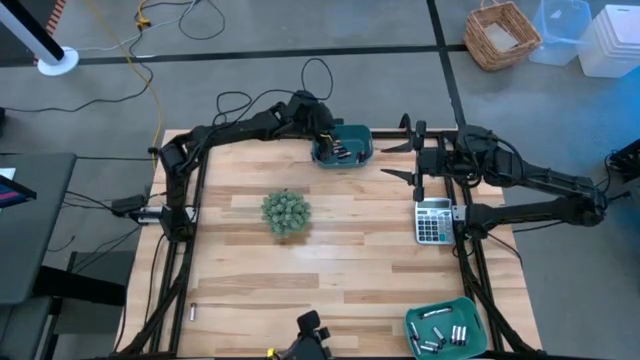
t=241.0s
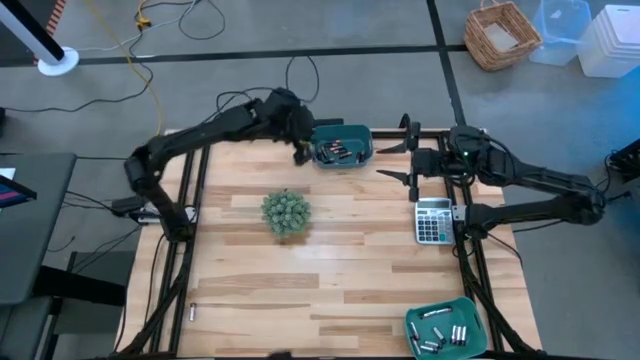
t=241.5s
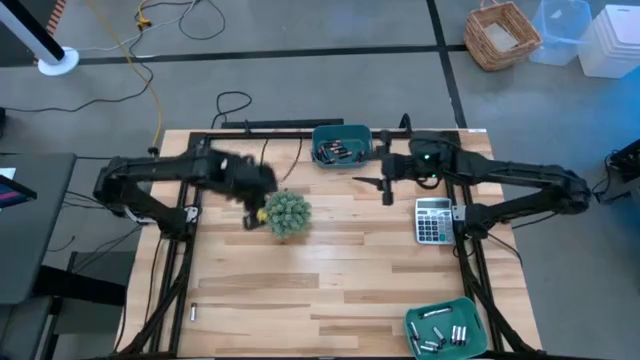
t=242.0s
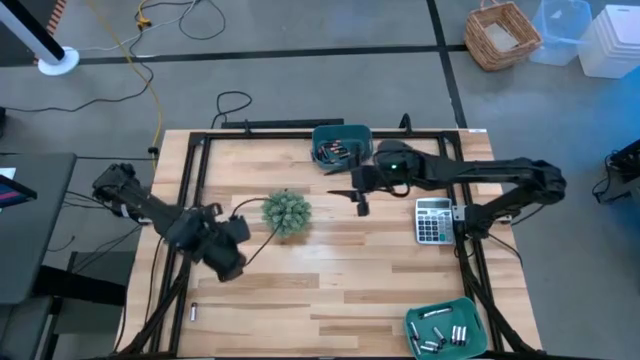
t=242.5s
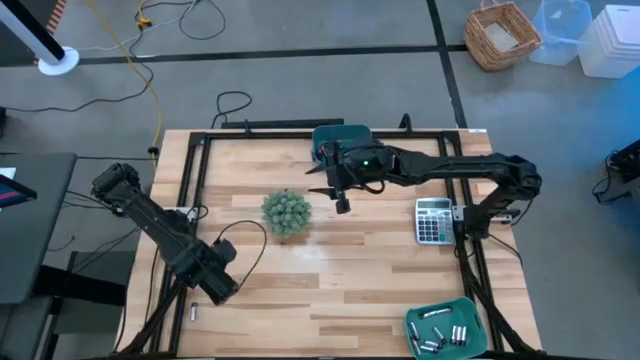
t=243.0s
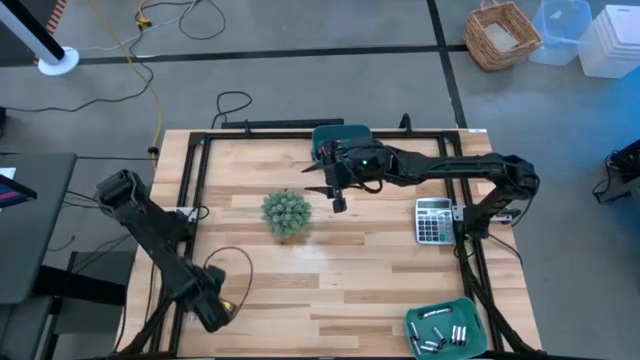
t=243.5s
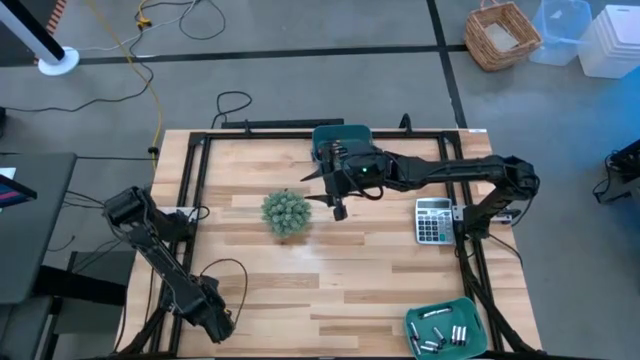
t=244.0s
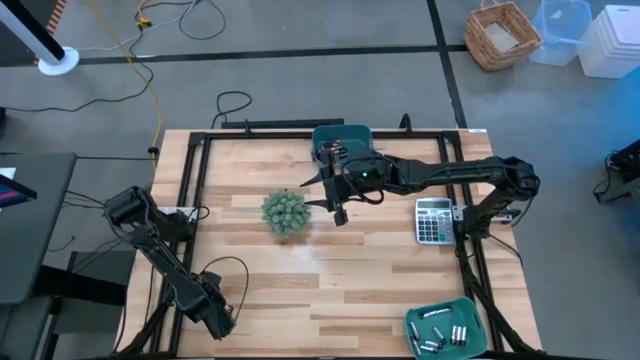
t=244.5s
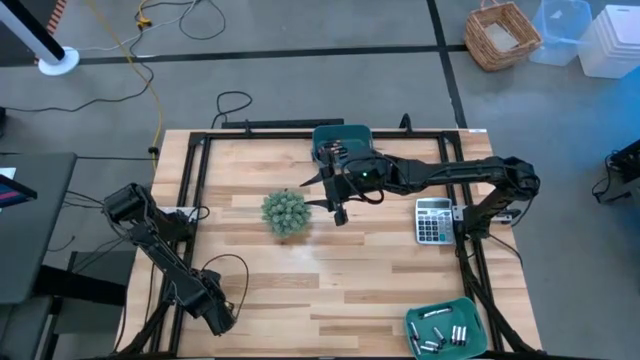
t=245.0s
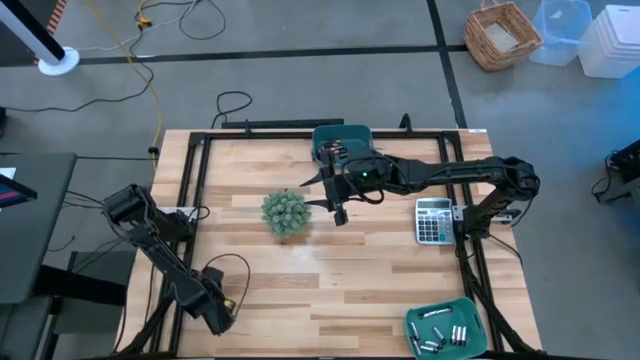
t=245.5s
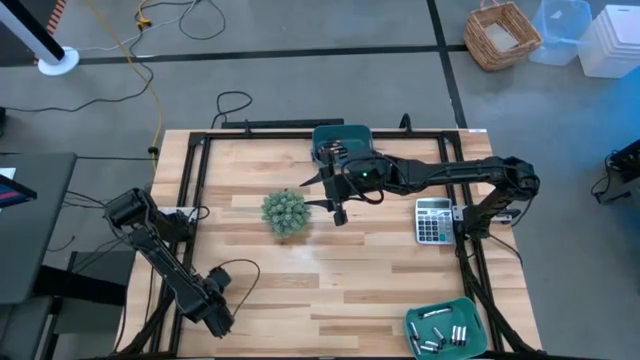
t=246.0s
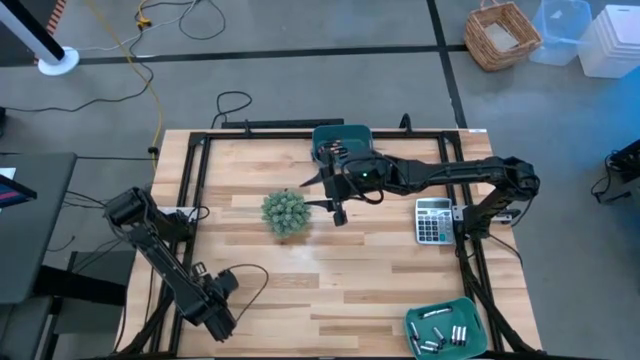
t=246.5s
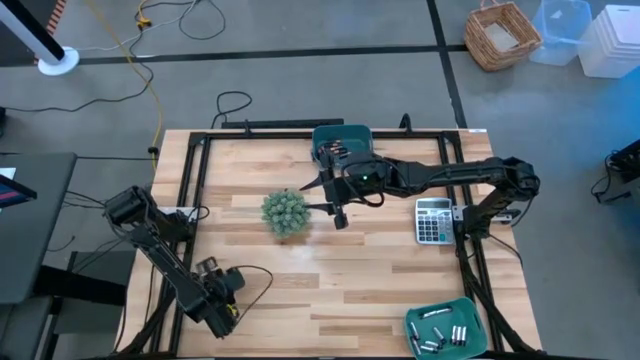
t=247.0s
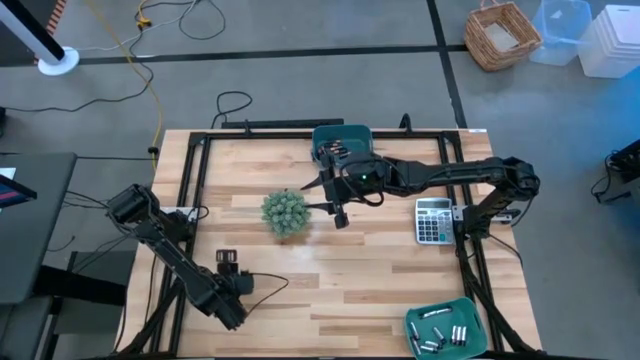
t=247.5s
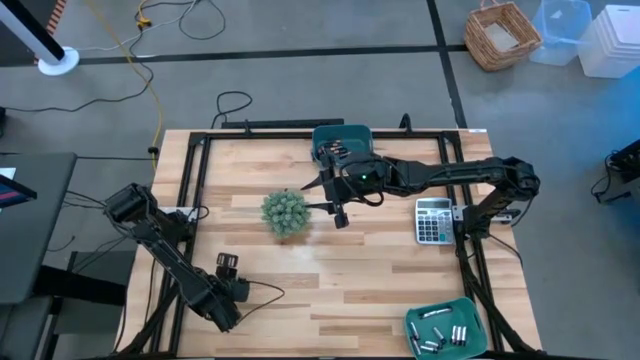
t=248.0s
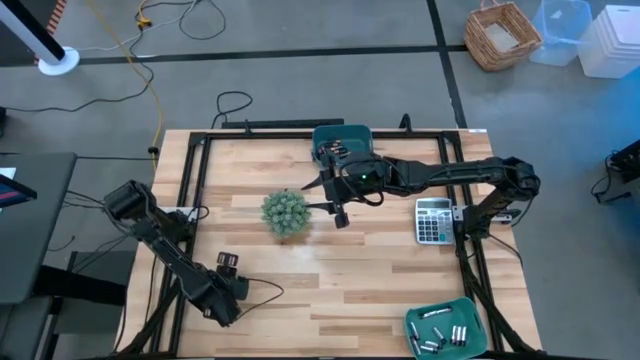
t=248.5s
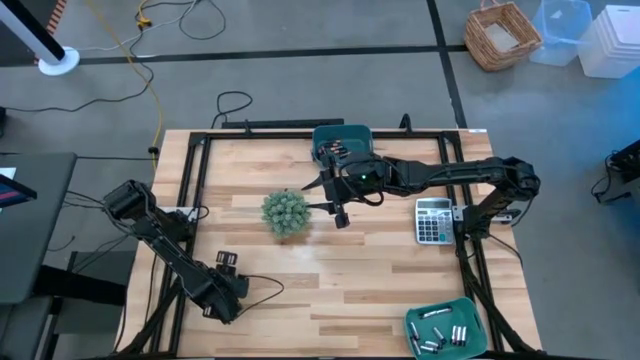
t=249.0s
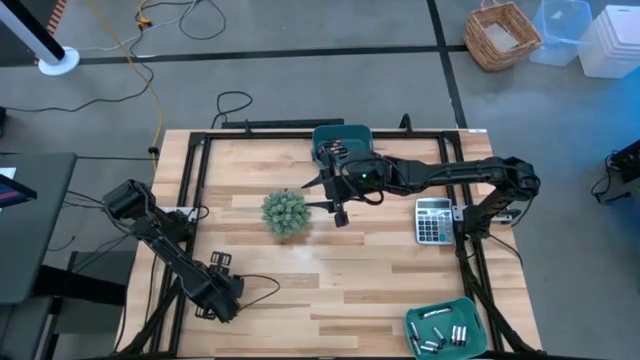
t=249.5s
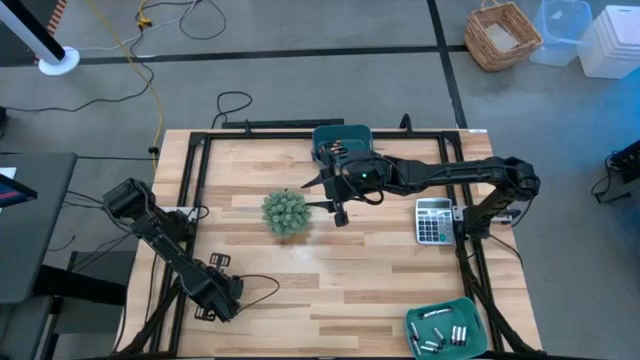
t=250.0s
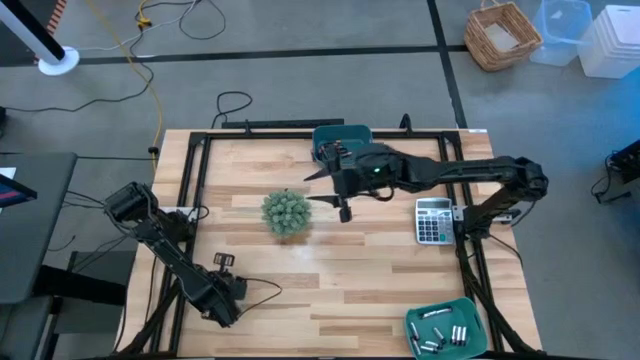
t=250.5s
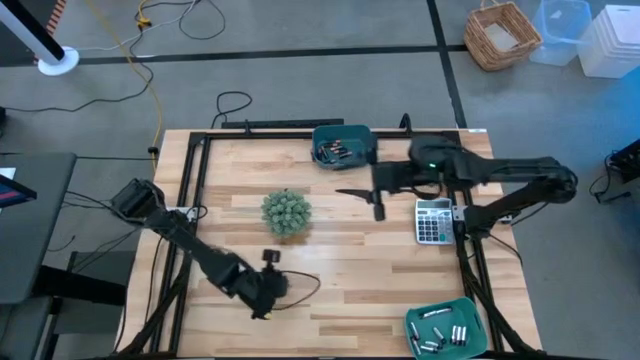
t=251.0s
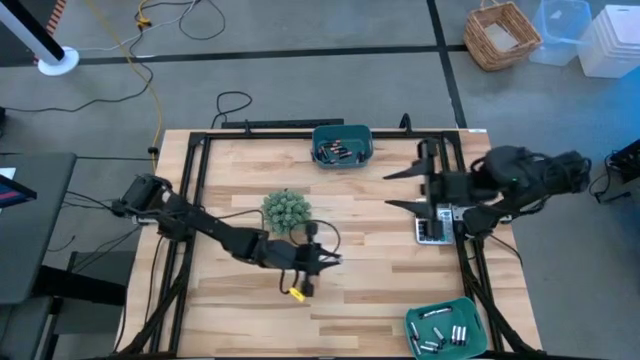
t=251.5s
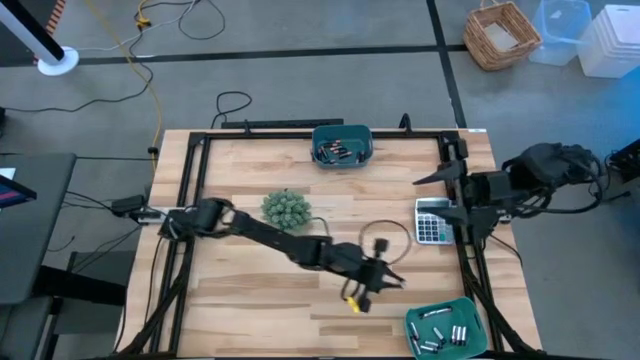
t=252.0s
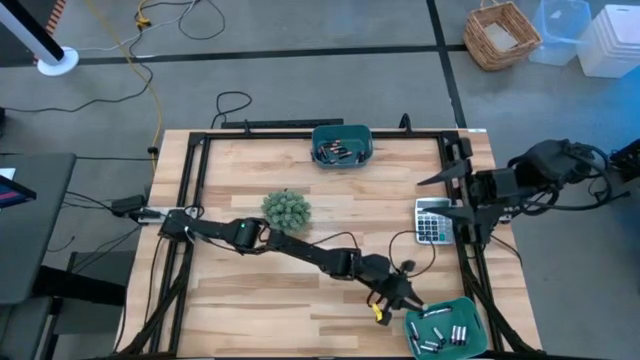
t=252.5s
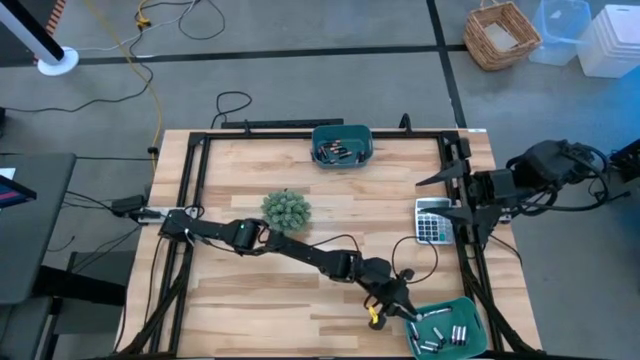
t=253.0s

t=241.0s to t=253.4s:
Task: Sort batteries
Put the silver battery into the green bin

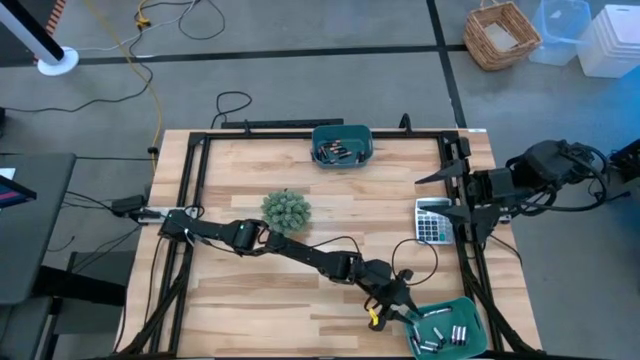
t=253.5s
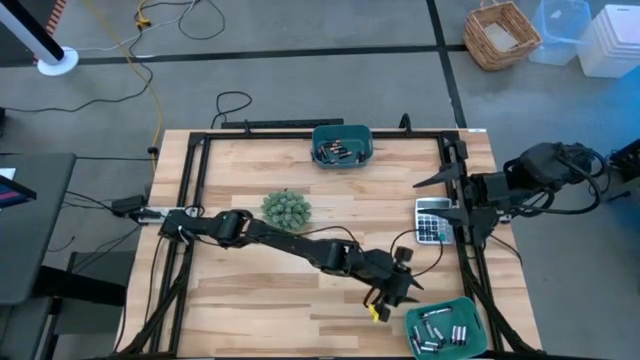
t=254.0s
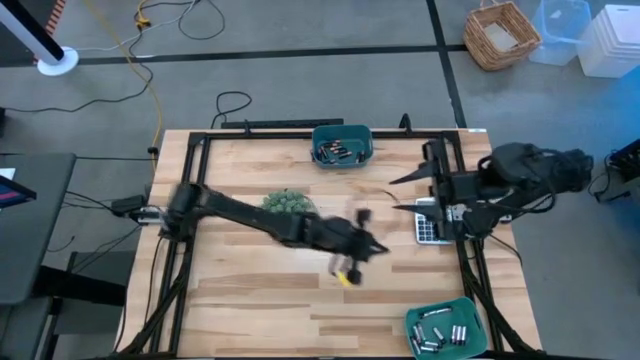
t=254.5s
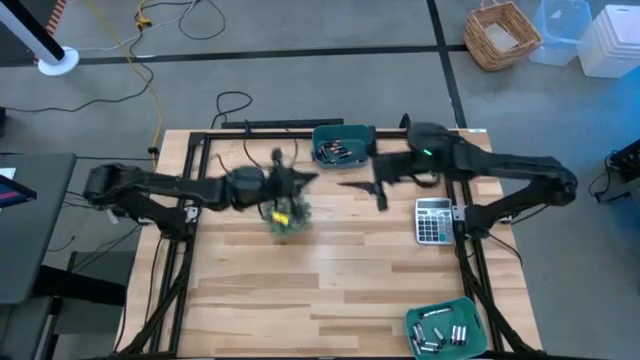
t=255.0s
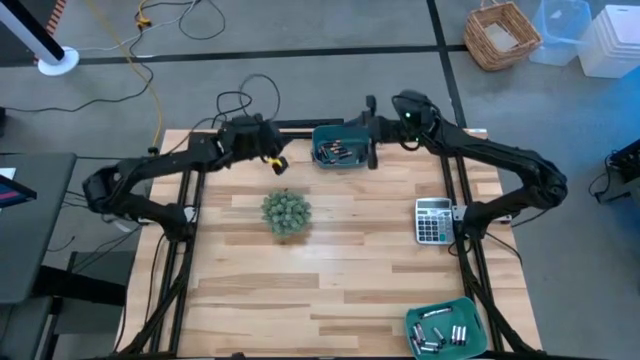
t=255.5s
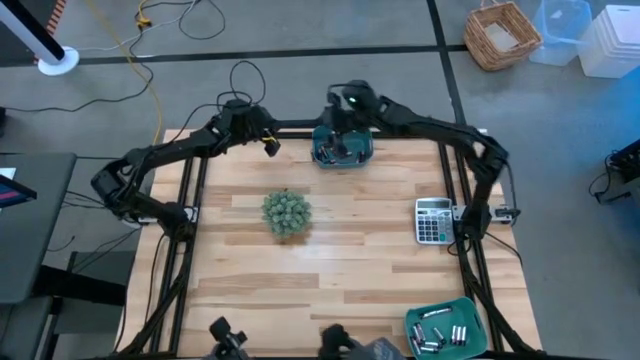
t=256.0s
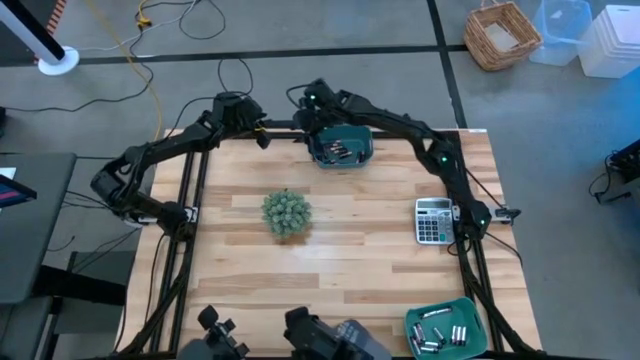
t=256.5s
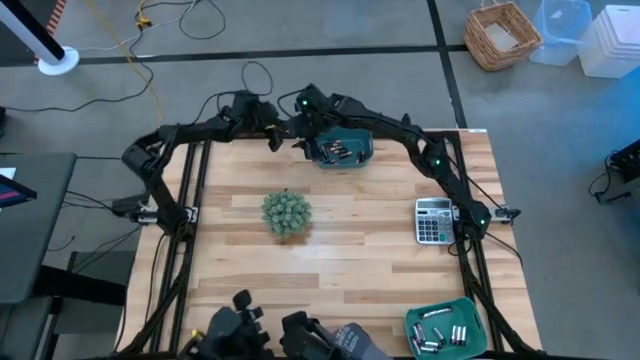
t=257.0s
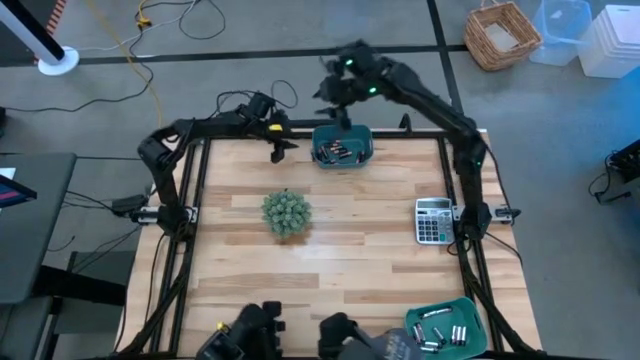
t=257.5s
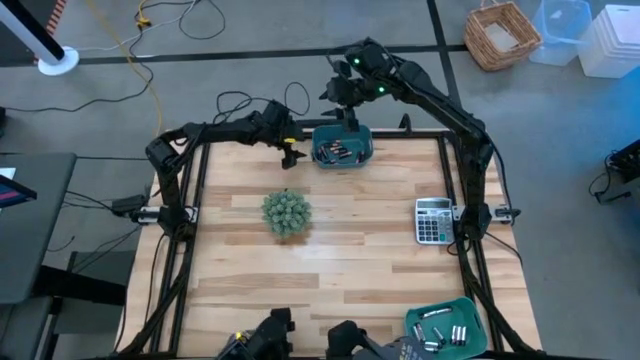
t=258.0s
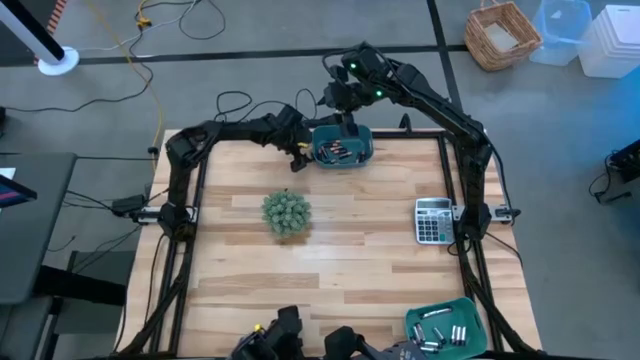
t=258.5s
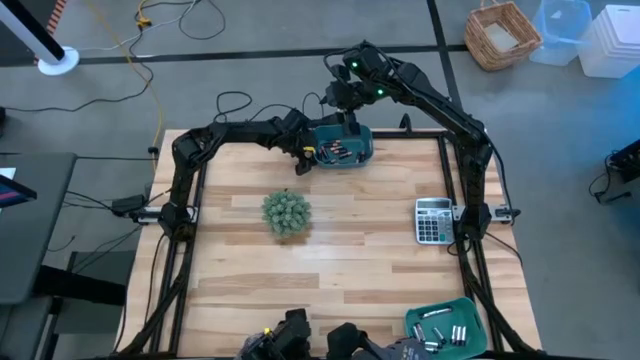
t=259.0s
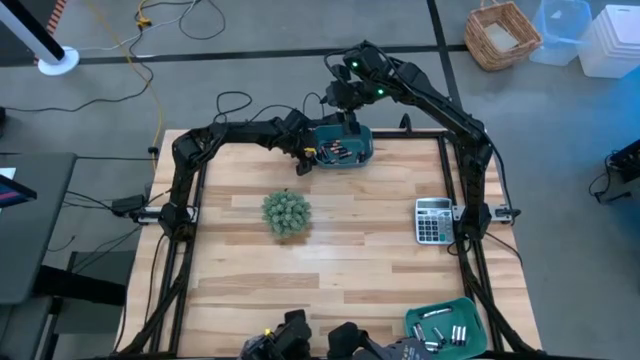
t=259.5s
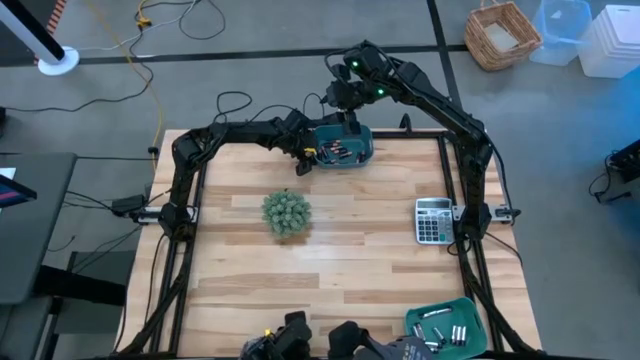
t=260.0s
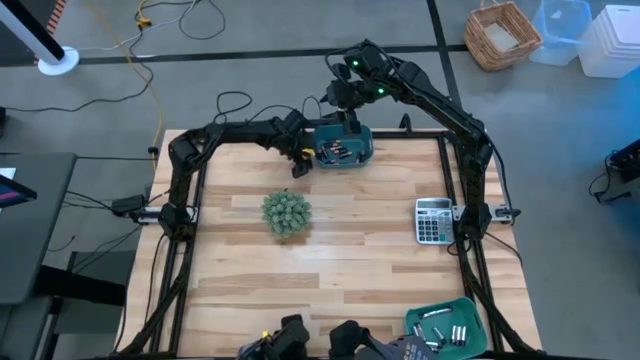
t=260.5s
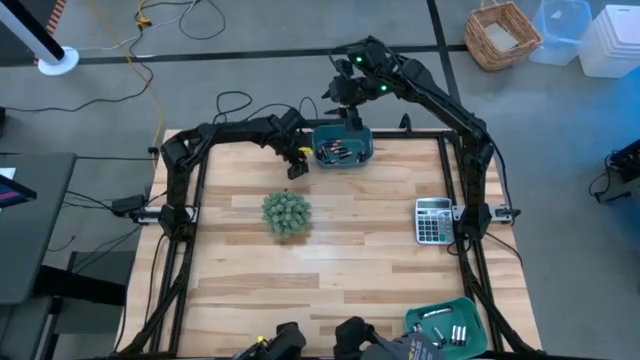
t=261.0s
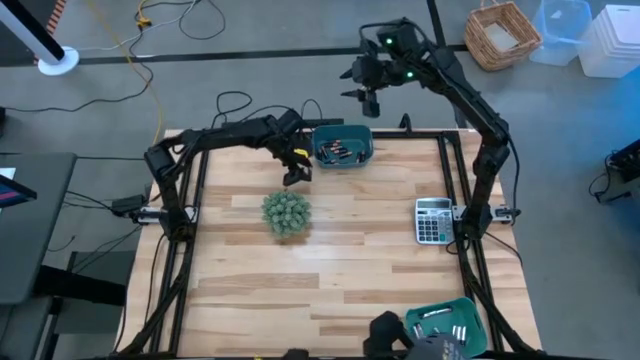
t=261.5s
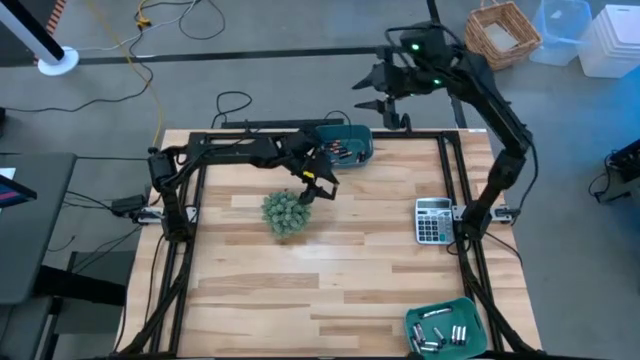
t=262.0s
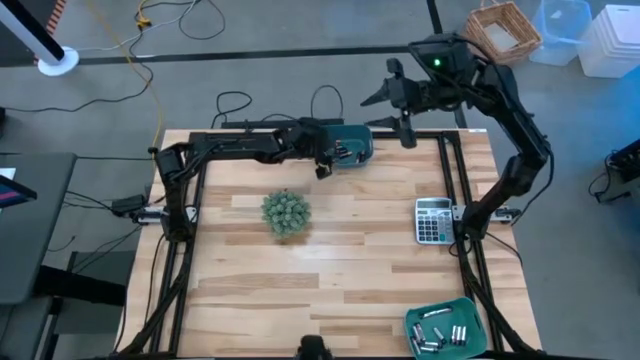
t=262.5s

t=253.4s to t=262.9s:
Put the black battery into the blue bin
